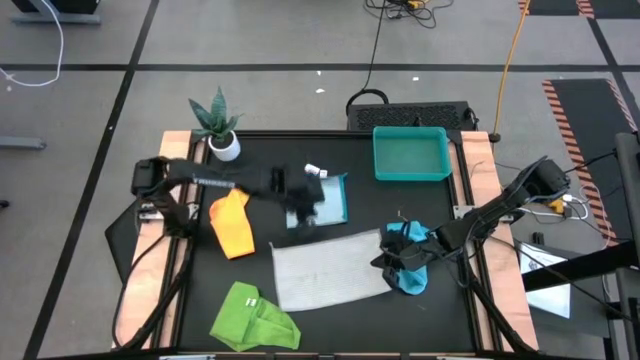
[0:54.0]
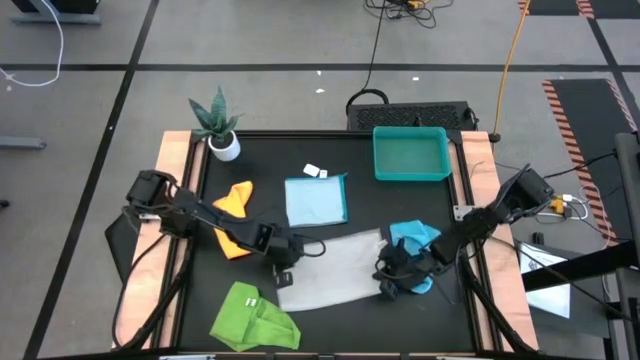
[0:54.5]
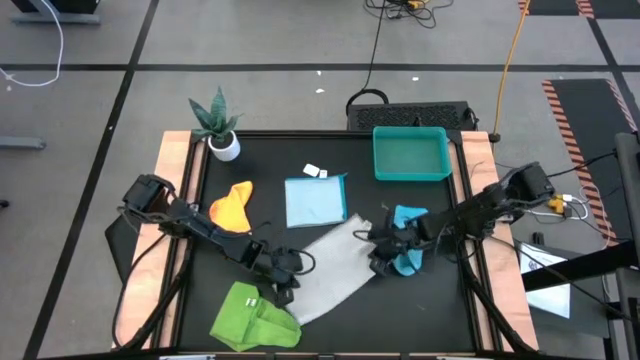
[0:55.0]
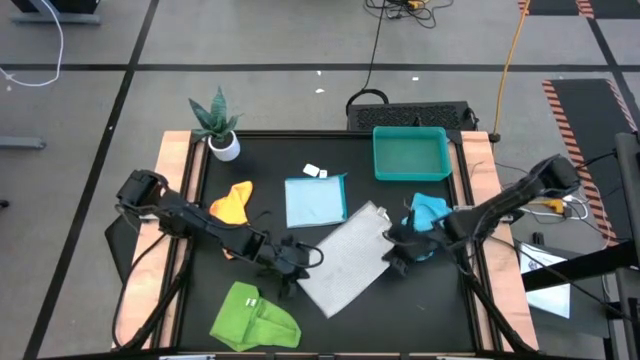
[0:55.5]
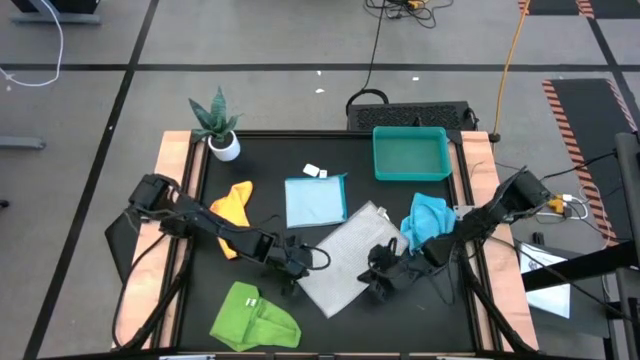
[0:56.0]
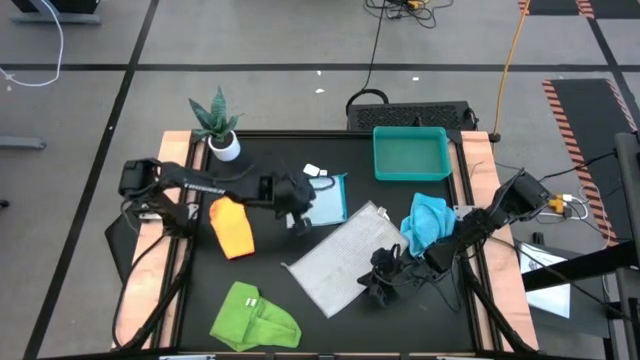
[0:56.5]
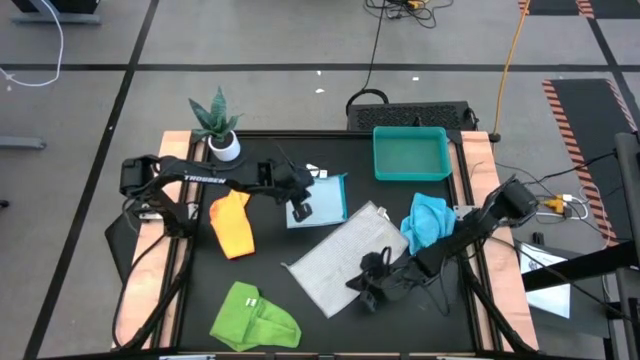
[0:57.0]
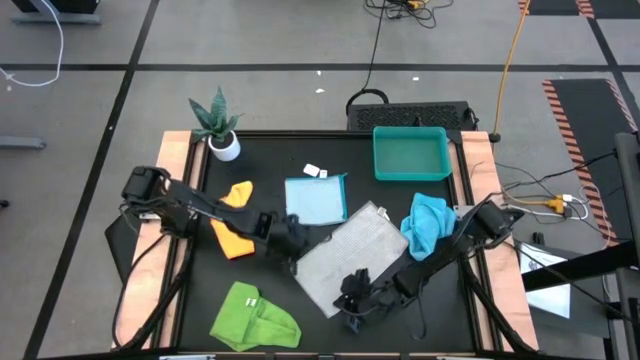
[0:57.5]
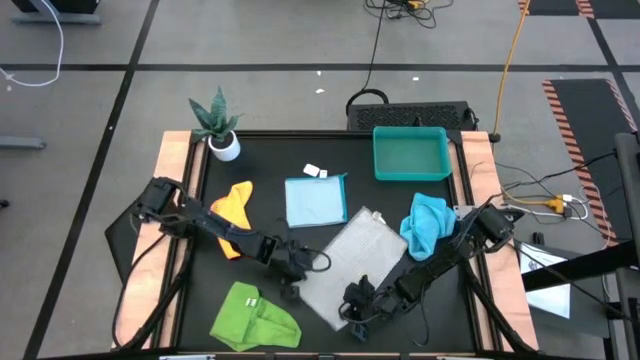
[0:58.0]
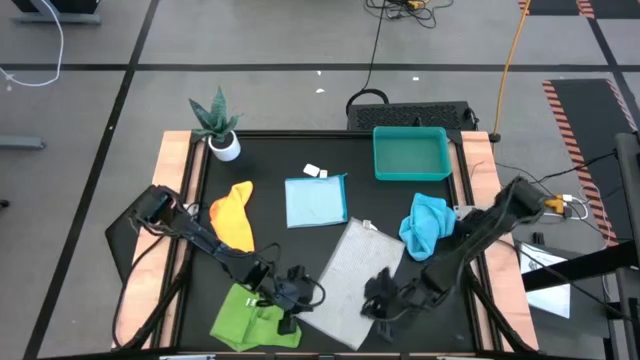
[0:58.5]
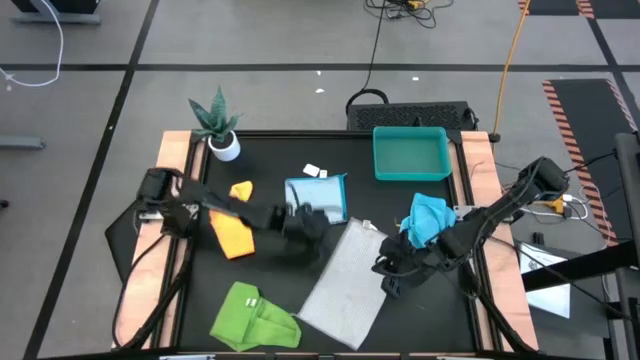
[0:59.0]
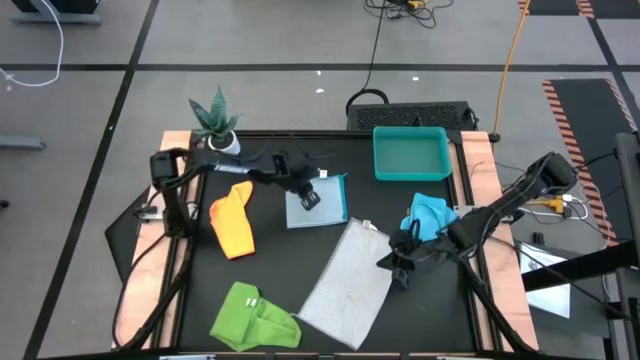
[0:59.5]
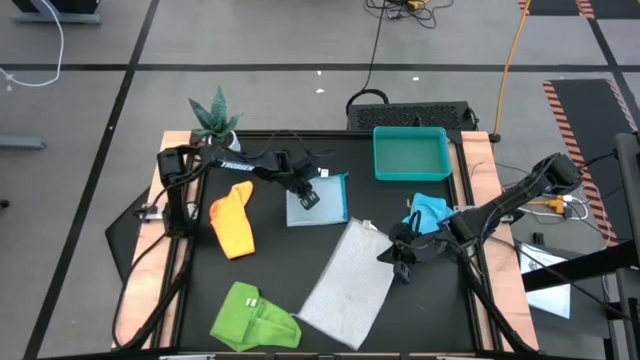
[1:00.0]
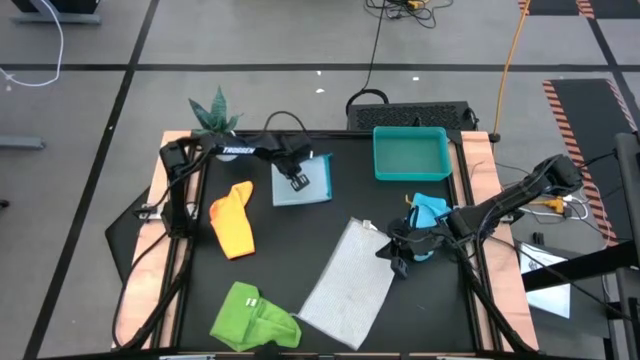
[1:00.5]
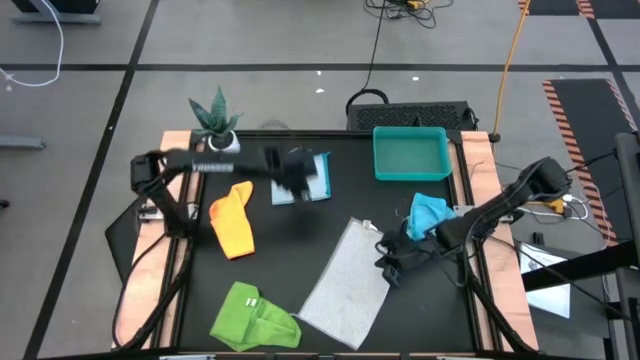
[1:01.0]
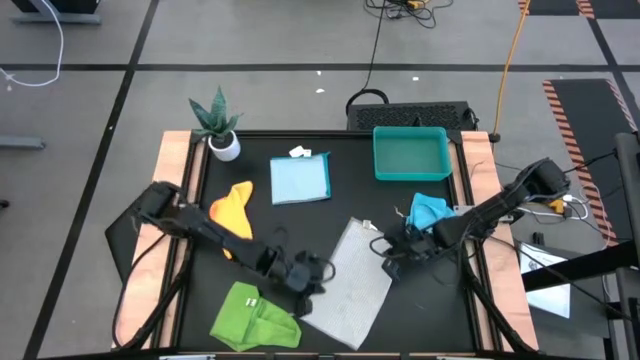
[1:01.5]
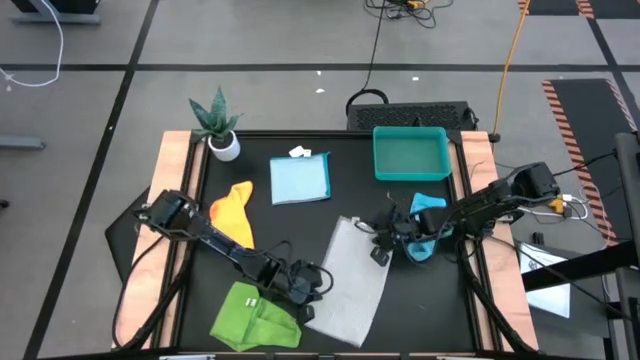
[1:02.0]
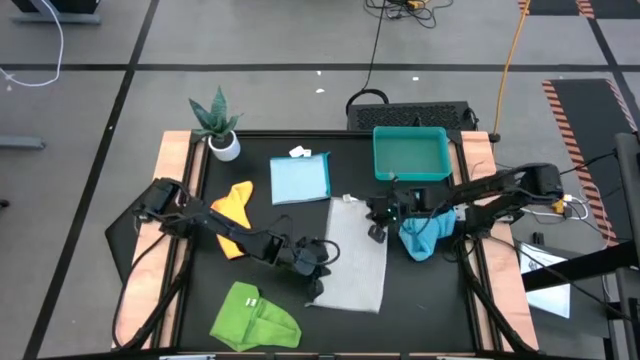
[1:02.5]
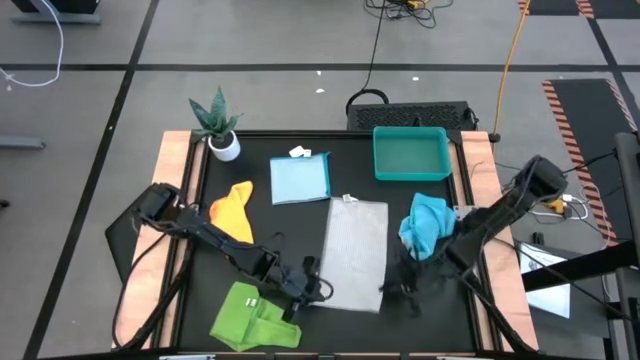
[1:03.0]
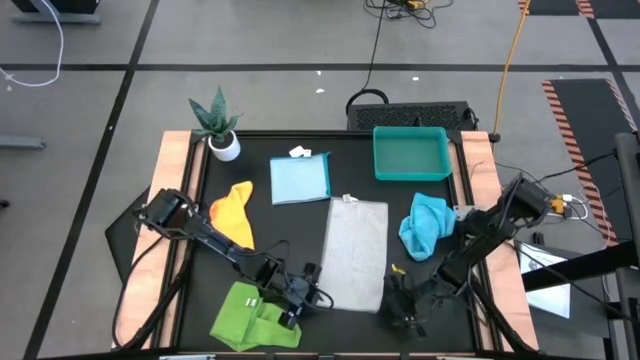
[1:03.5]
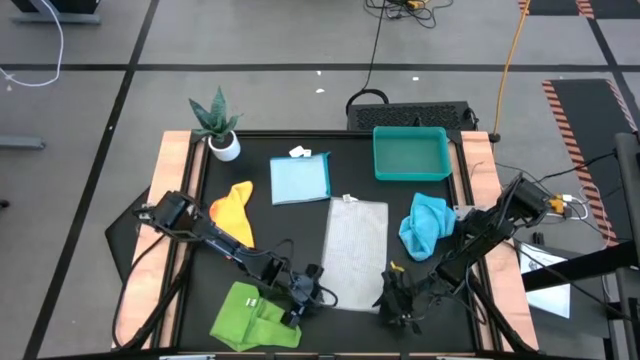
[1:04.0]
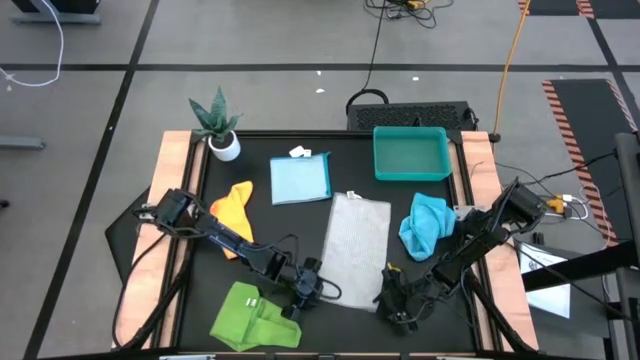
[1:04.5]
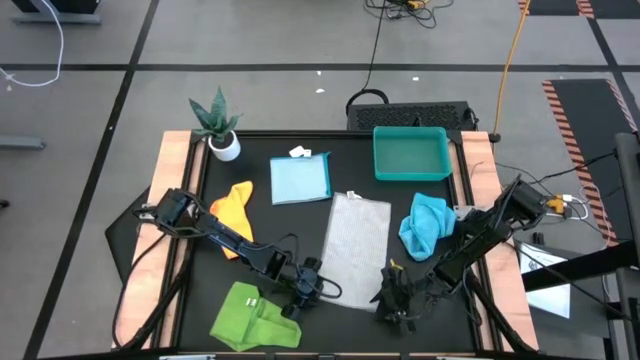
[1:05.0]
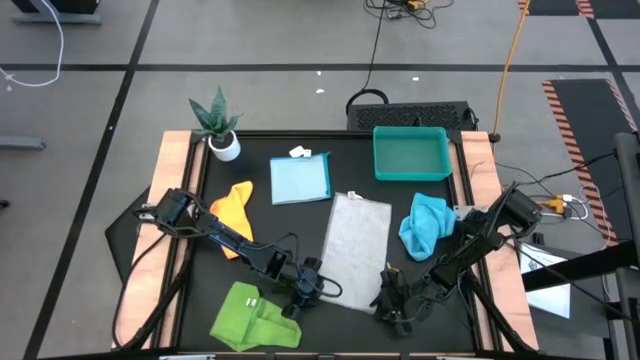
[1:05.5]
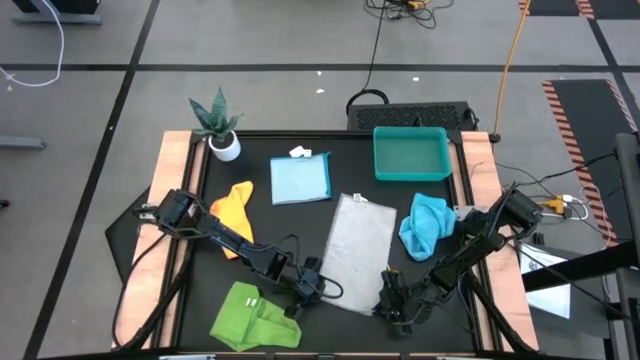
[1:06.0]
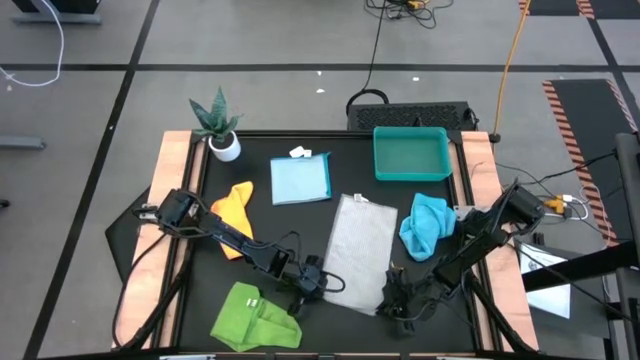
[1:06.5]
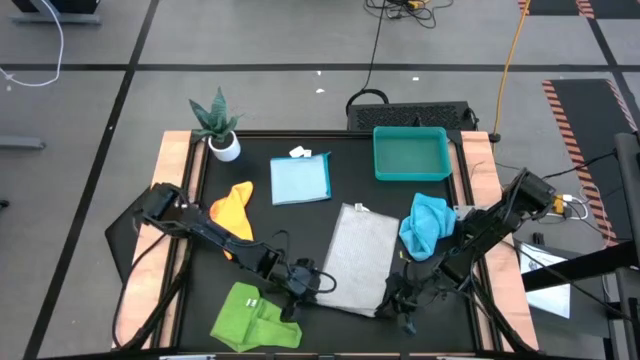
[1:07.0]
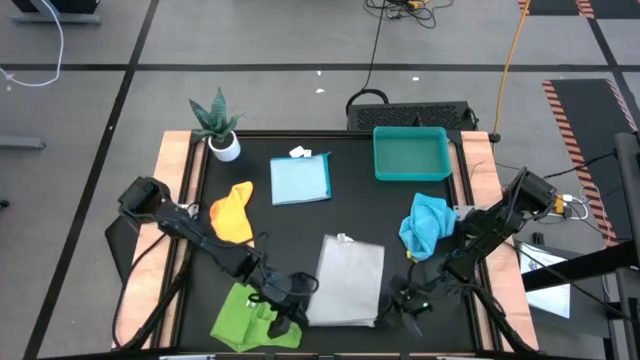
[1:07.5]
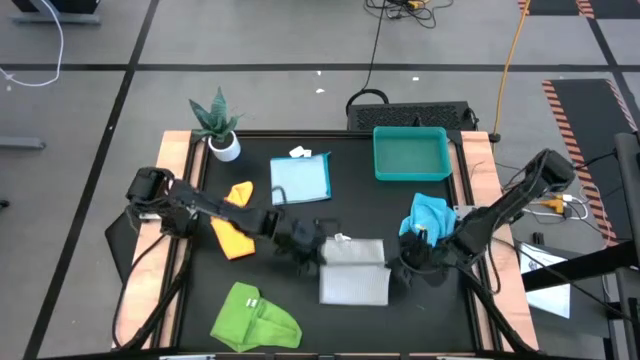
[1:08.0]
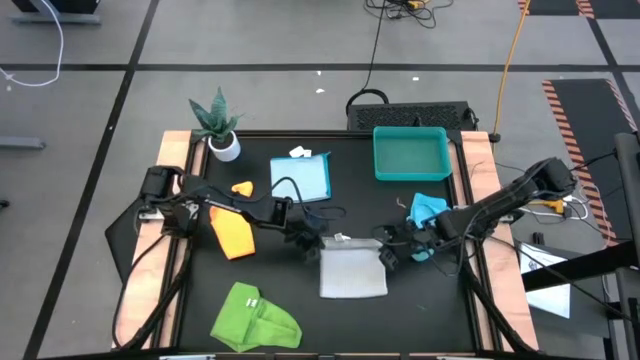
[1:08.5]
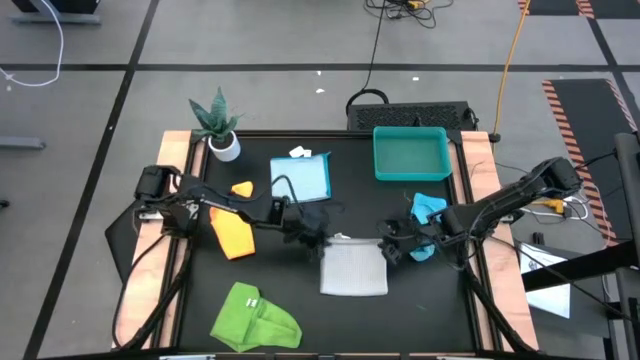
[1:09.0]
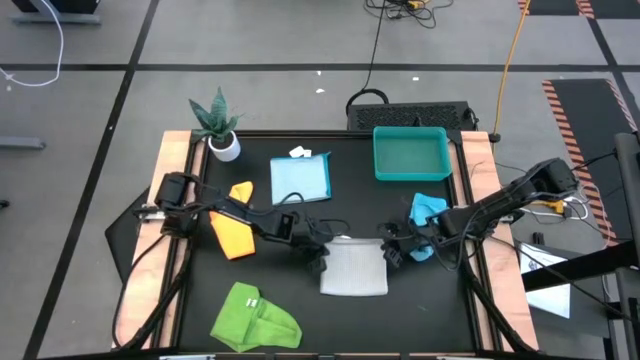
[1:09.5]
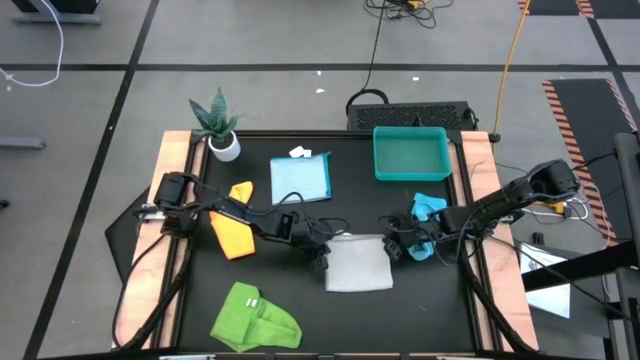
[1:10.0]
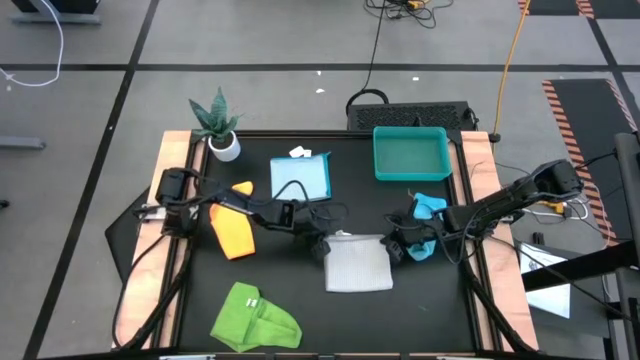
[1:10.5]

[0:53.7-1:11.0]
Task: Fold microfiber towels
Fold the gray microfiber towel on the towel

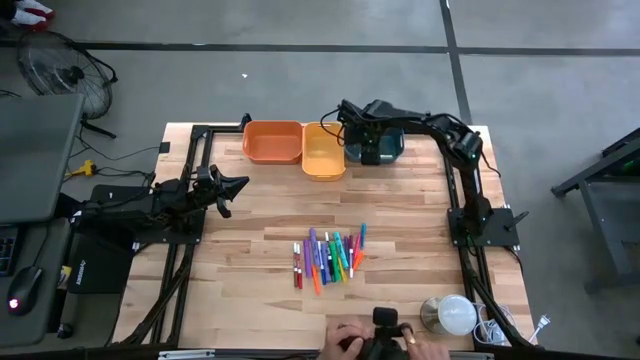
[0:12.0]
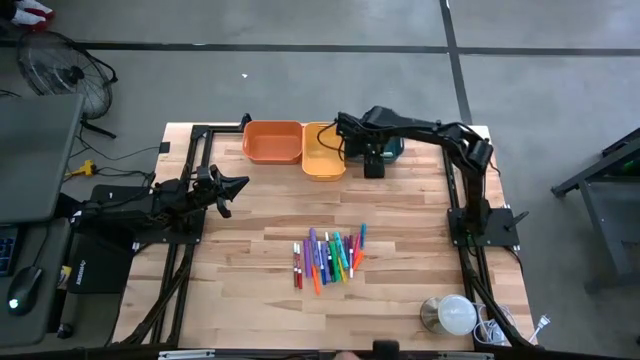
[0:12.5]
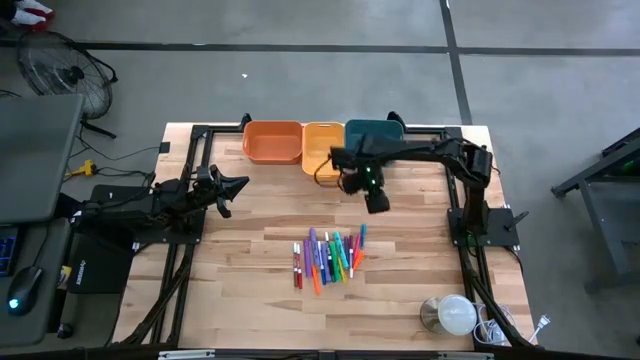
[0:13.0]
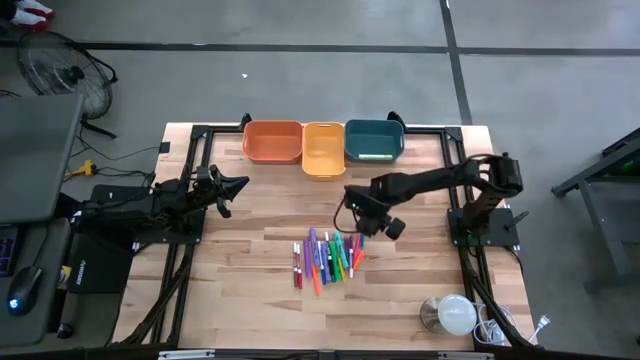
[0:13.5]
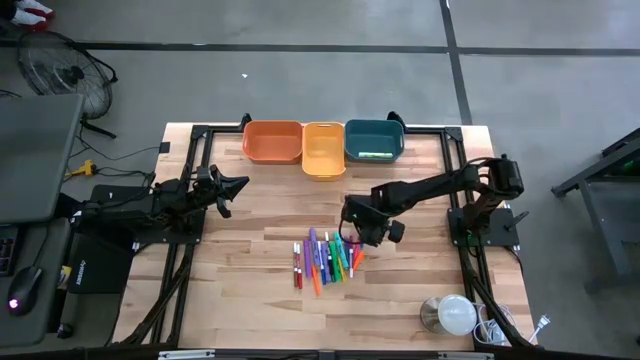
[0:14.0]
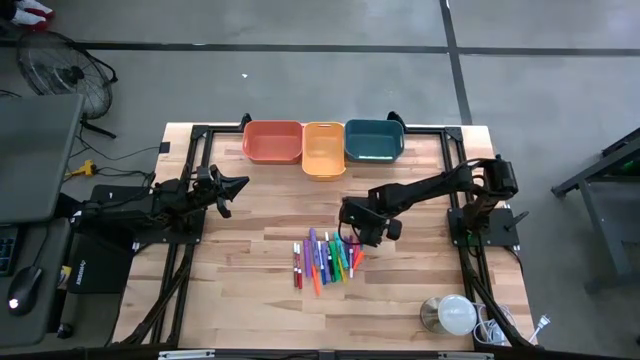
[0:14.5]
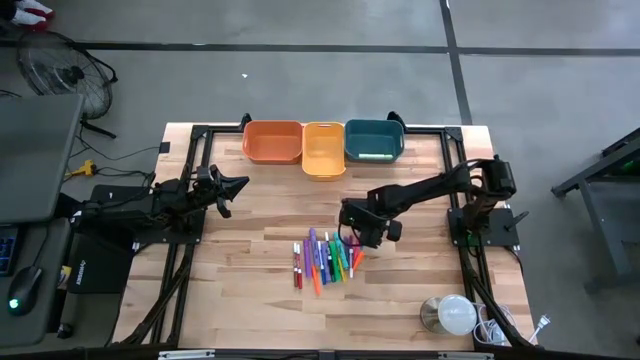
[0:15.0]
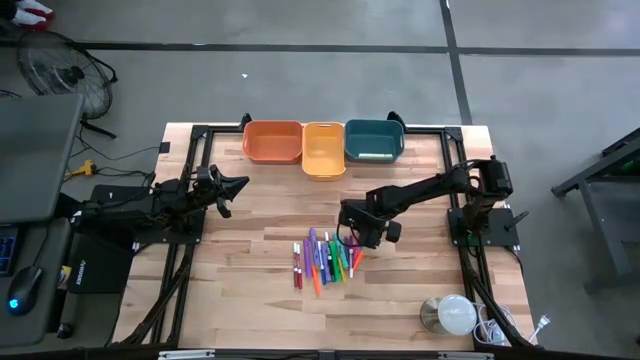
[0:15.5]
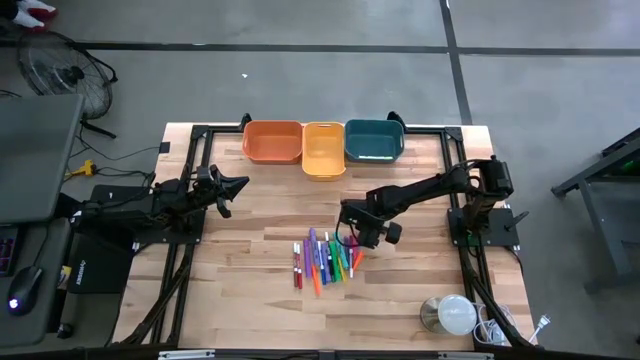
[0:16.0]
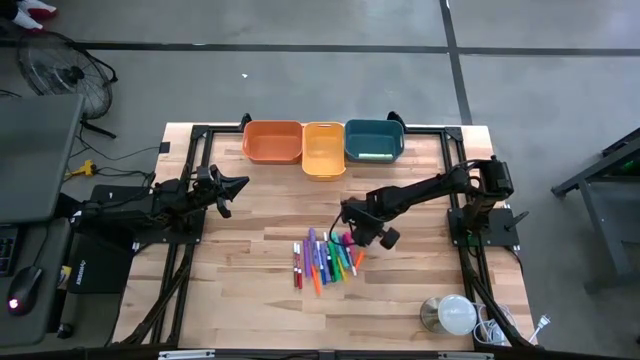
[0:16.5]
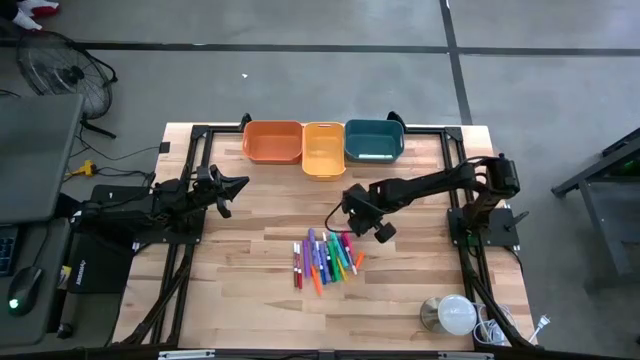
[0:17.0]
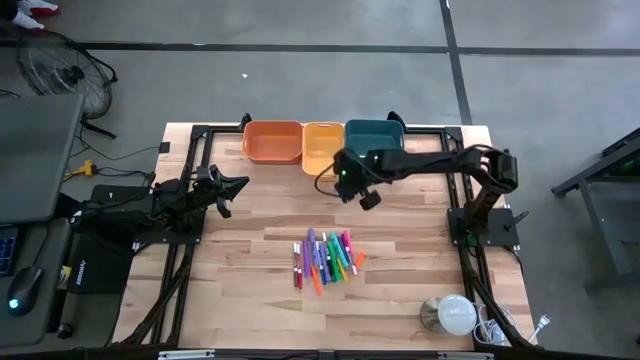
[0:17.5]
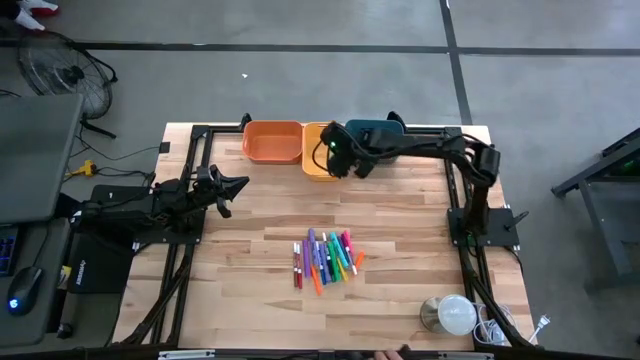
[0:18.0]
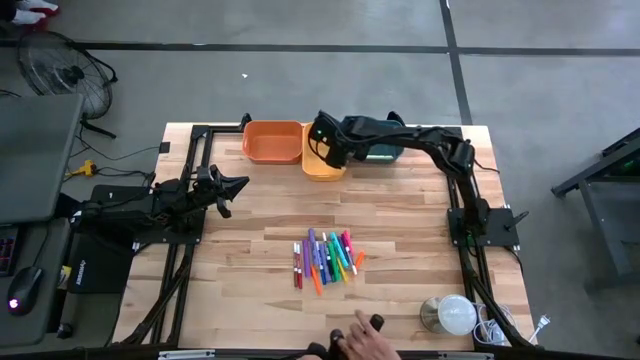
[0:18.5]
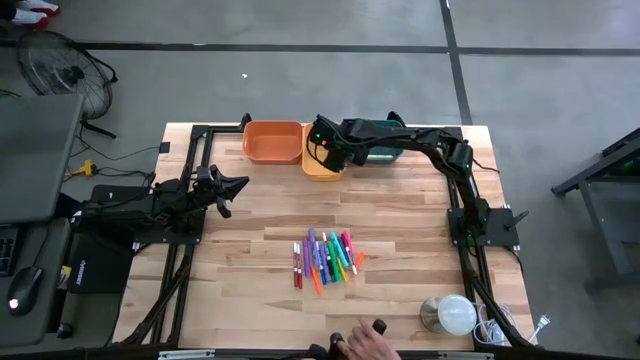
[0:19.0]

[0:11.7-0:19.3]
Task: Pick & Place Markers
Put the blue pen into the yellow bin
